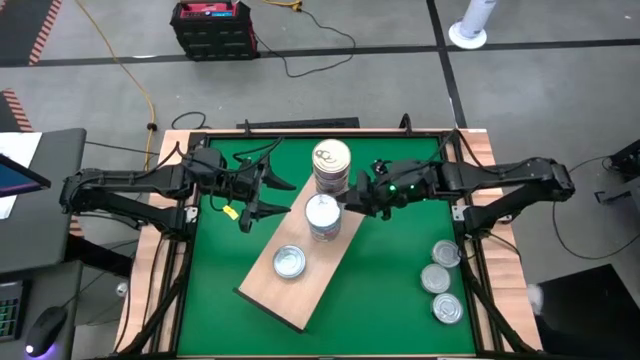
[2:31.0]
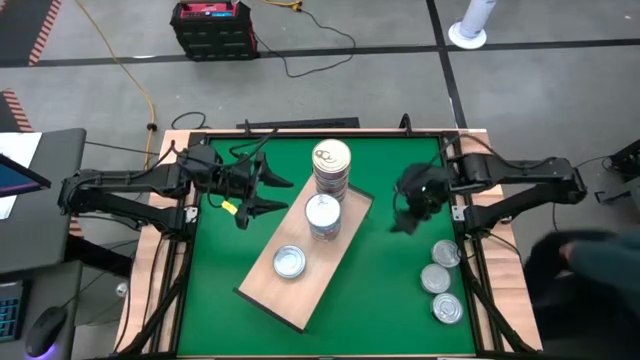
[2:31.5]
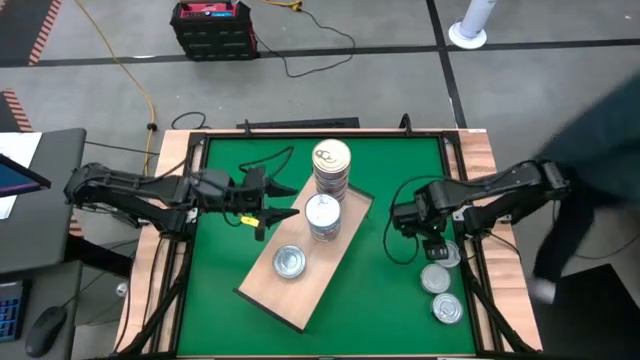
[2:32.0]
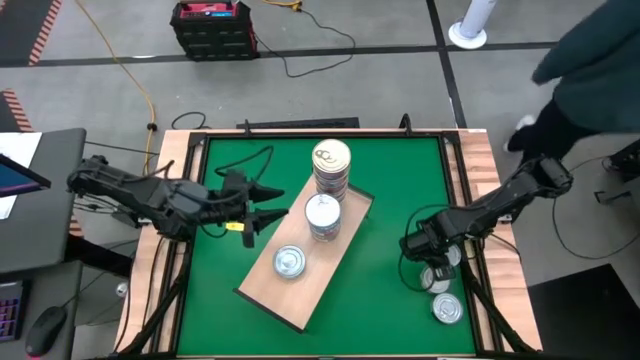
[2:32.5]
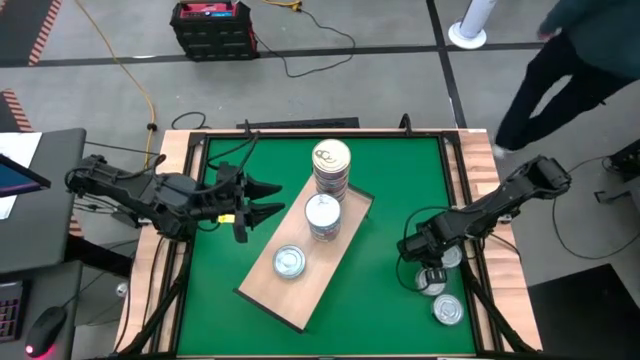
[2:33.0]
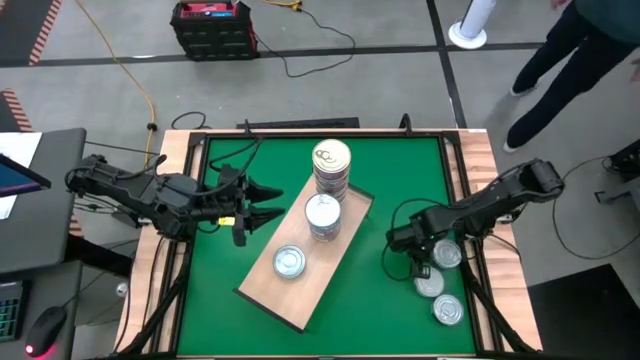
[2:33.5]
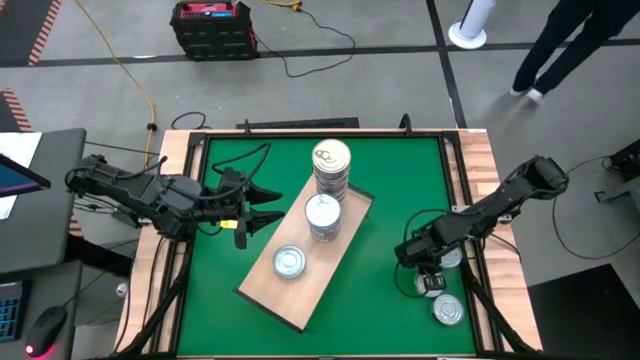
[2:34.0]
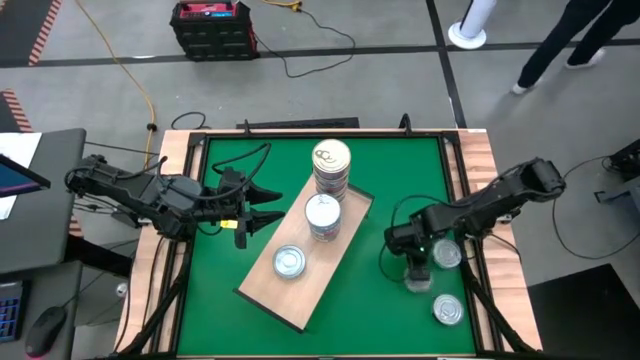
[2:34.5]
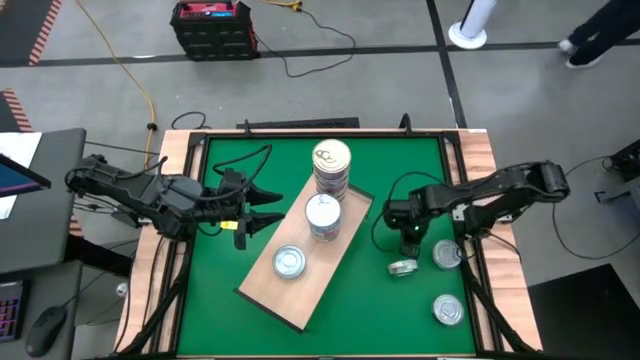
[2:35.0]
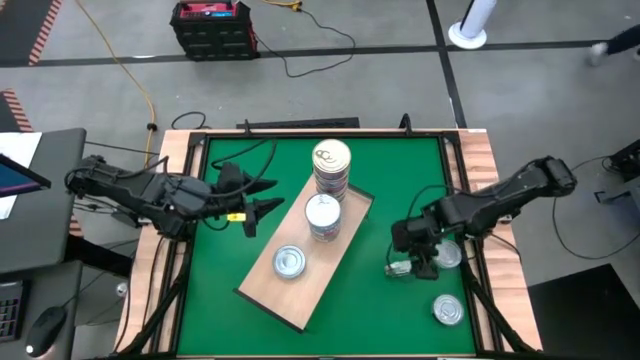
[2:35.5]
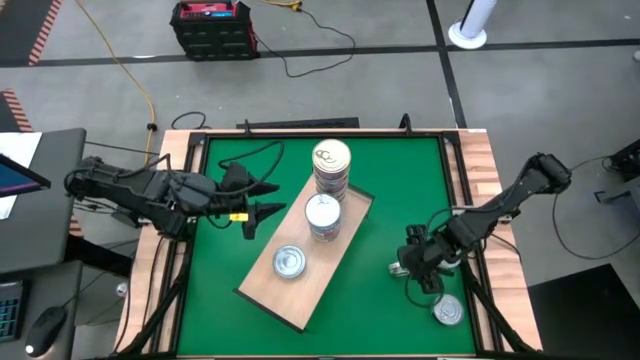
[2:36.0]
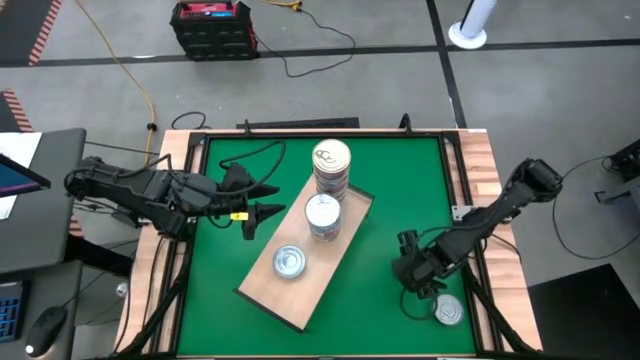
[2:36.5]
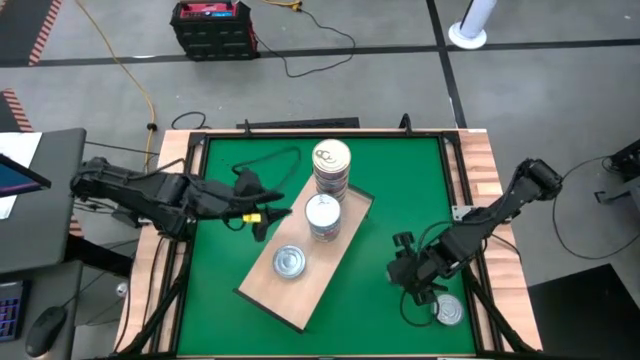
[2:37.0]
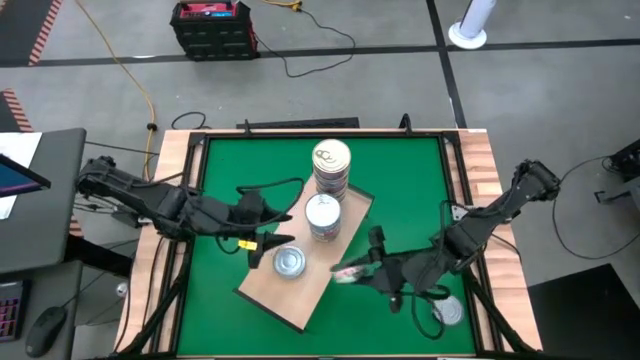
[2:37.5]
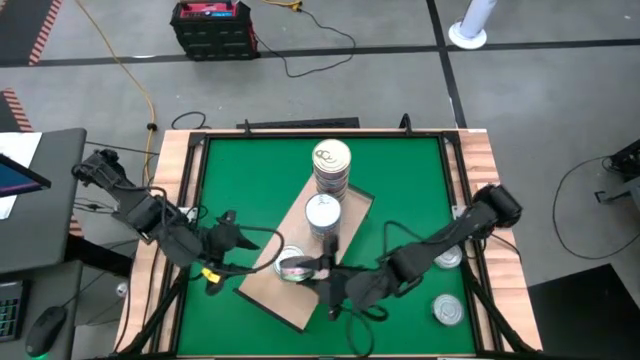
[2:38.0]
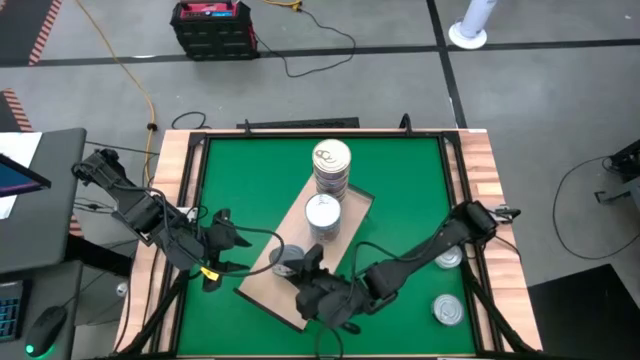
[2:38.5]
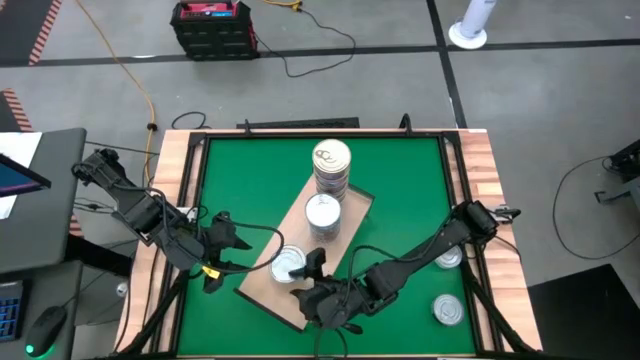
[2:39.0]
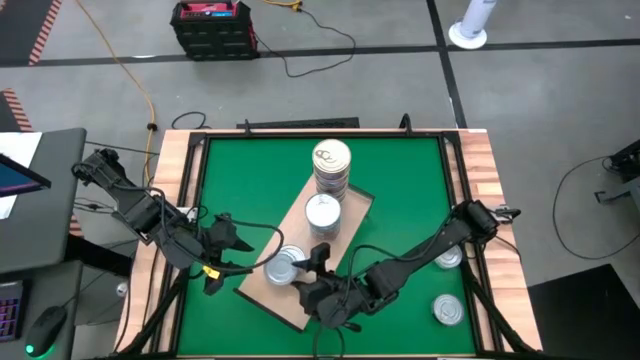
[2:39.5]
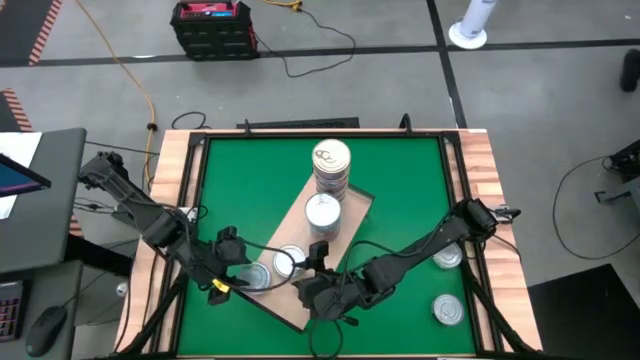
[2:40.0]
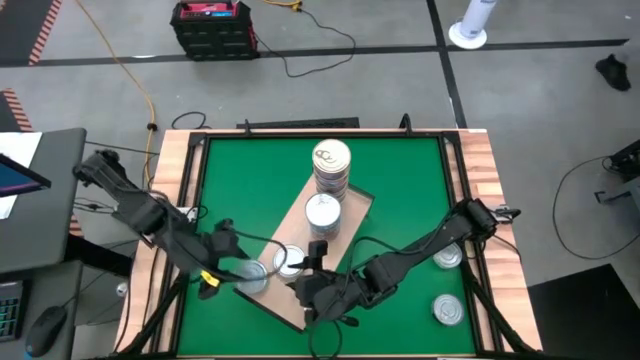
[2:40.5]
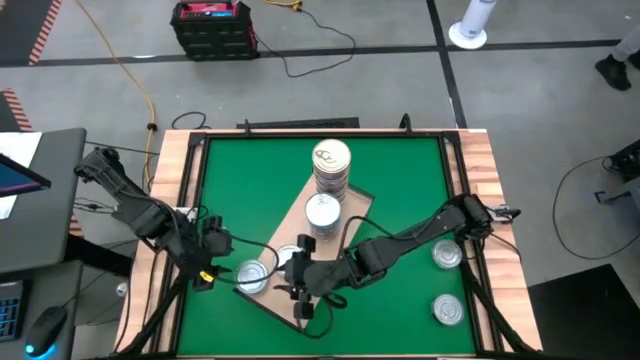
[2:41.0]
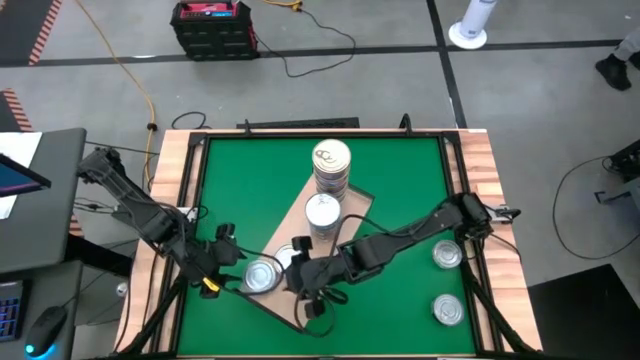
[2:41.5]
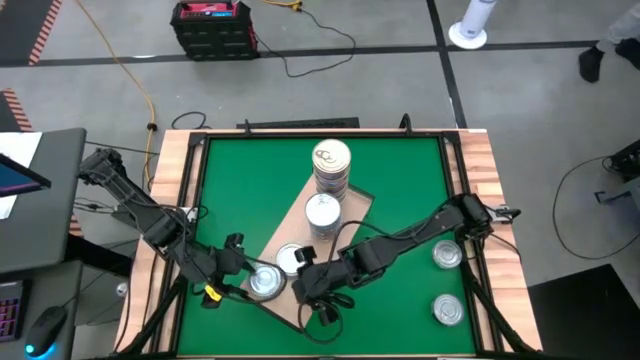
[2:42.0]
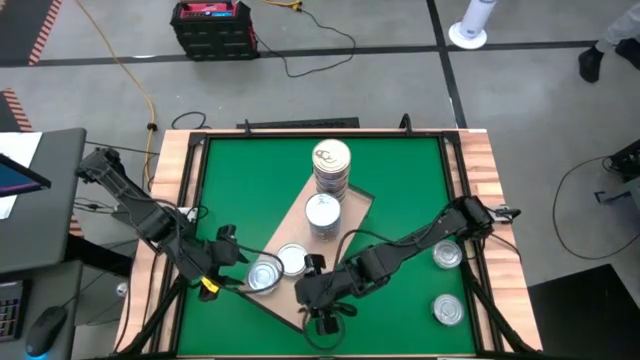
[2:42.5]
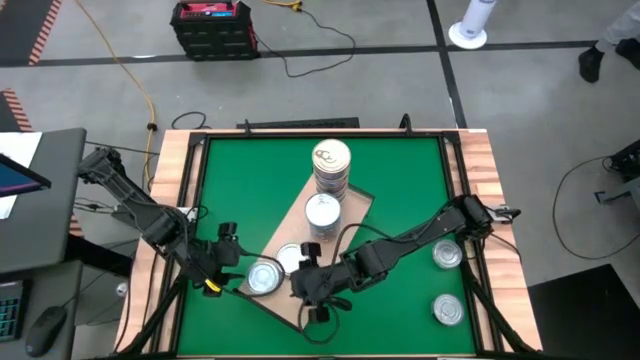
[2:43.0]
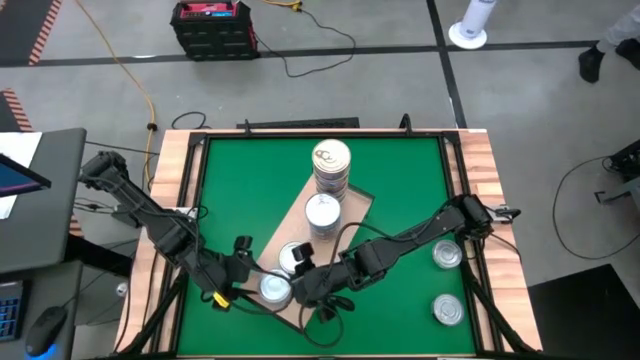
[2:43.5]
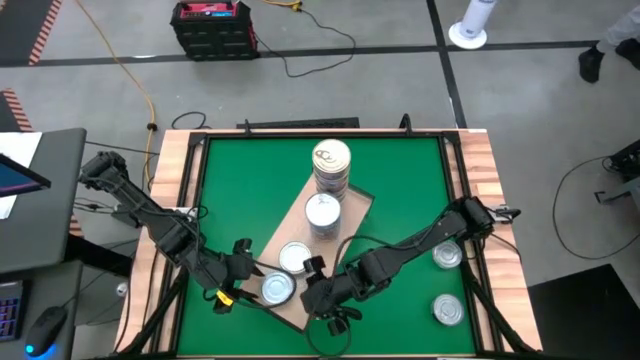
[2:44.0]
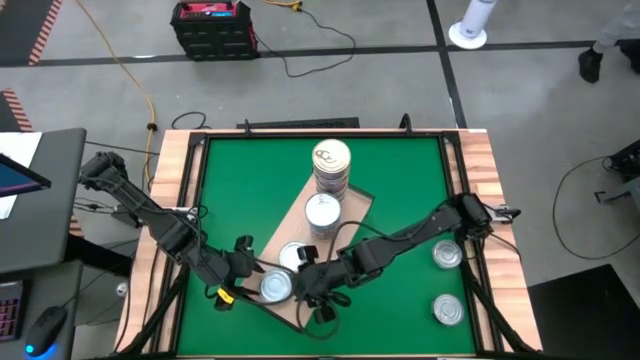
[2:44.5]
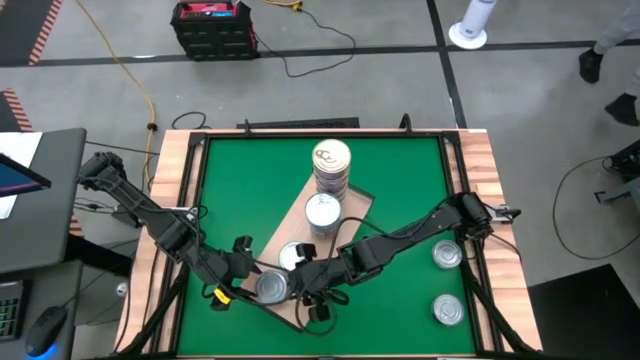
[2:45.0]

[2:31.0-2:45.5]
Task: Stack canned seafood by type on shelf
Stack the green white tuna can on top of other the green tuna can on the shelf

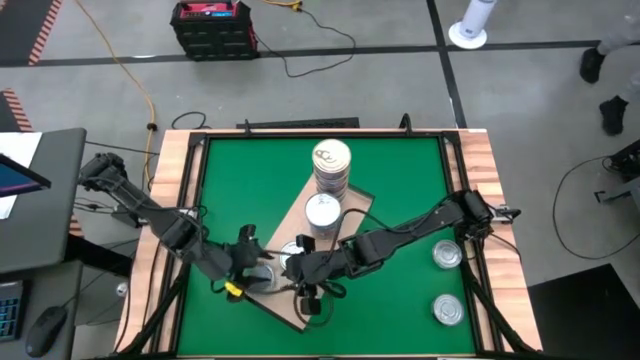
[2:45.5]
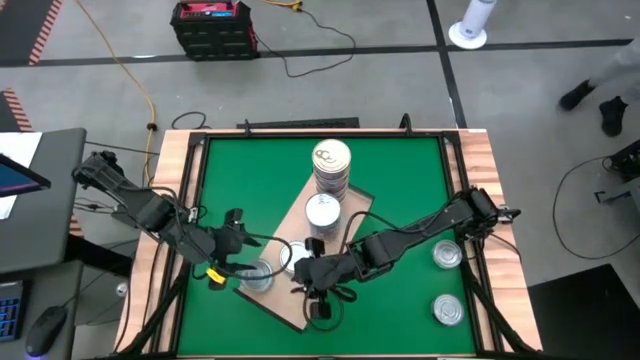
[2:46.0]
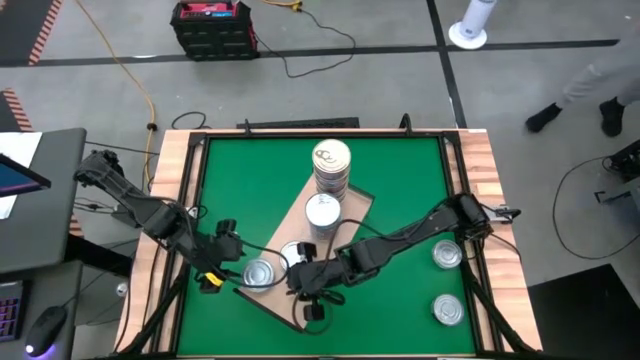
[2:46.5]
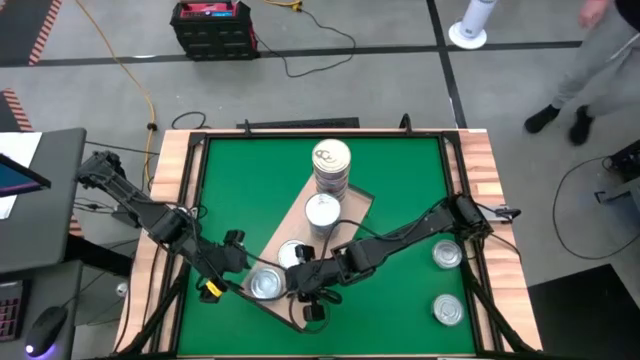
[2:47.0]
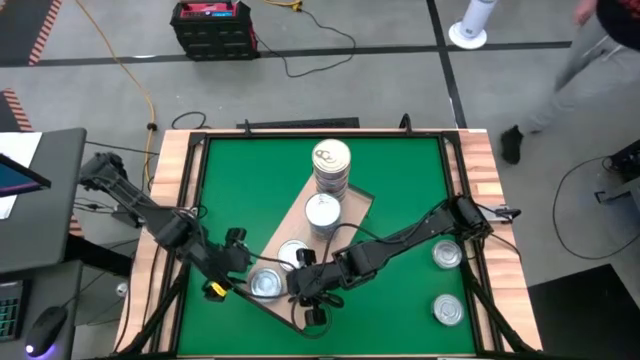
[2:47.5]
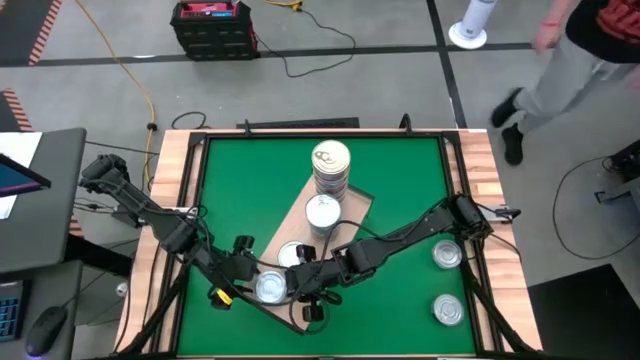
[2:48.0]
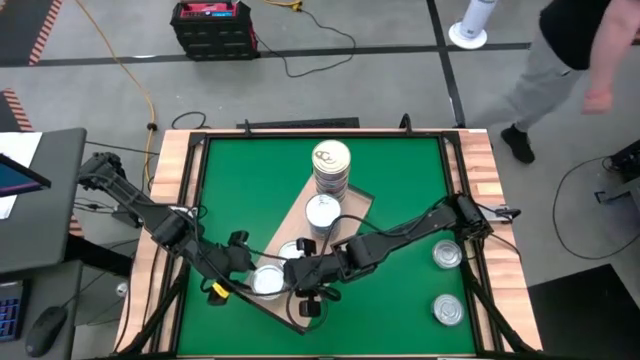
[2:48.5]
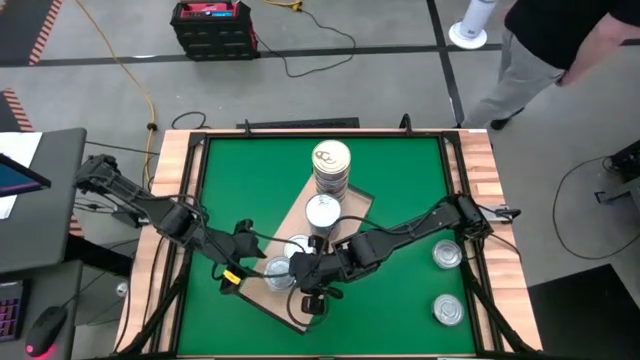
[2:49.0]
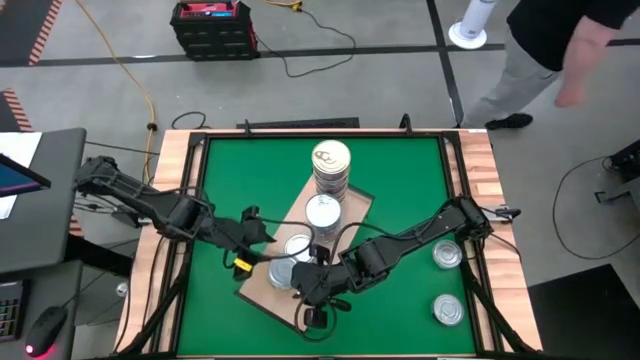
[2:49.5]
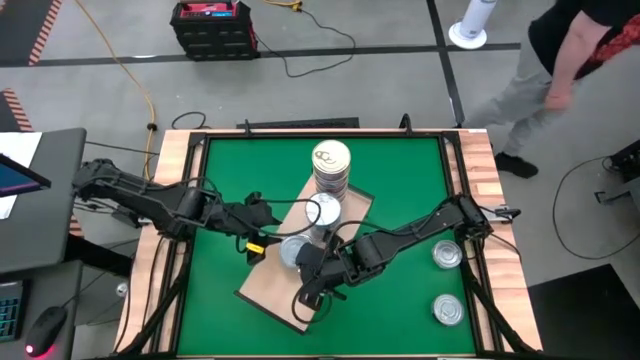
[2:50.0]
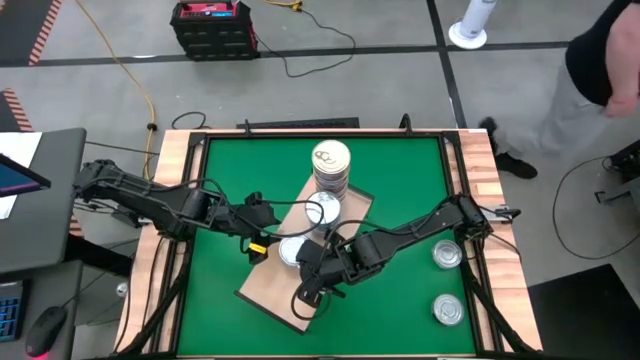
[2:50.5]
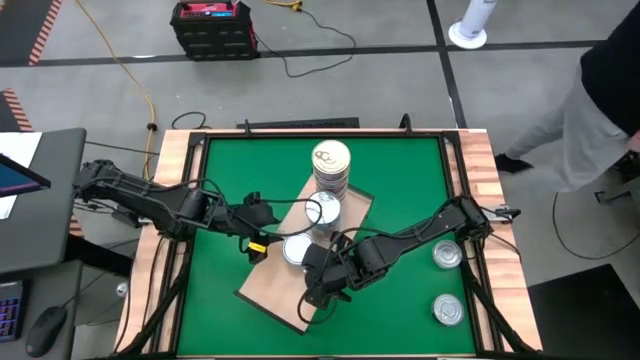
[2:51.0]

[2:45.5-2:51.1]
Stack the green white tuna can on top of other the green tuna can on the shelf
